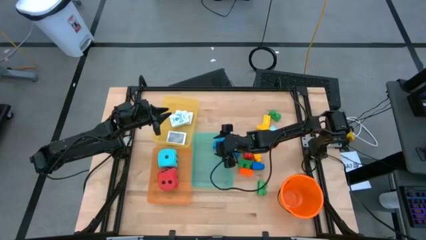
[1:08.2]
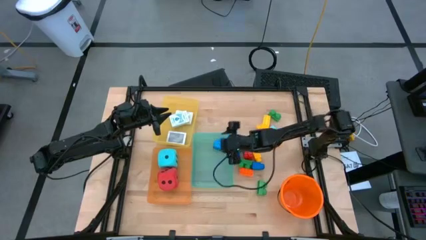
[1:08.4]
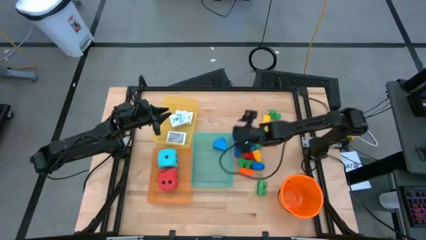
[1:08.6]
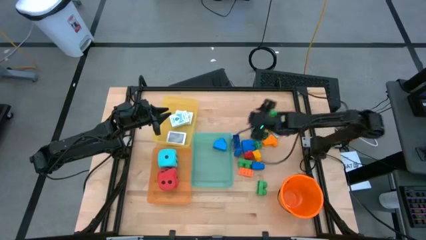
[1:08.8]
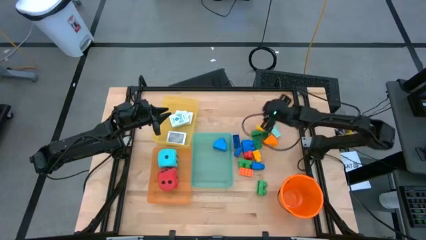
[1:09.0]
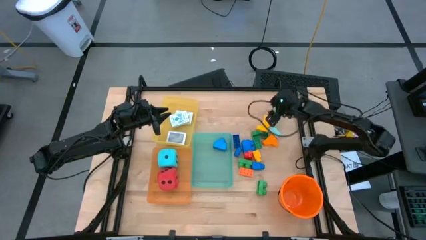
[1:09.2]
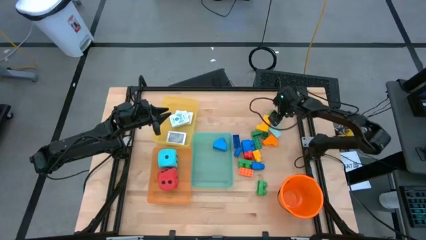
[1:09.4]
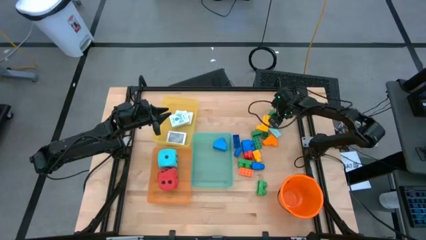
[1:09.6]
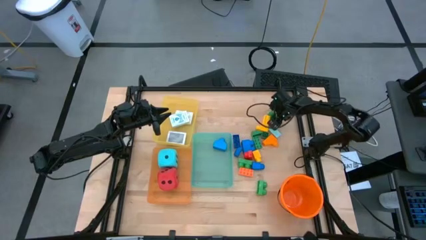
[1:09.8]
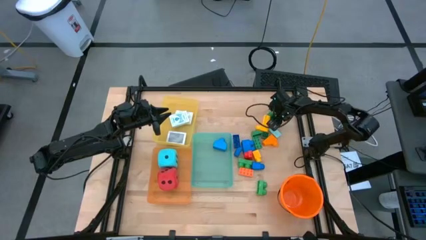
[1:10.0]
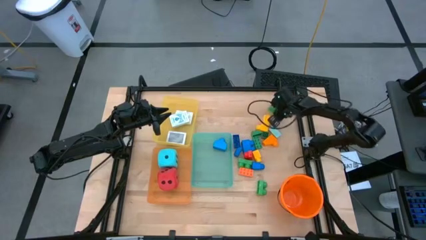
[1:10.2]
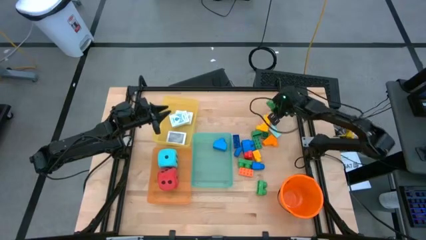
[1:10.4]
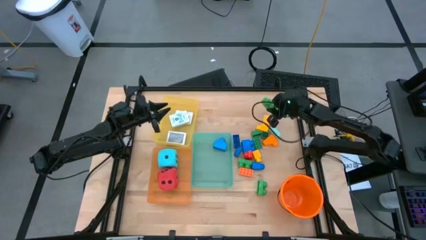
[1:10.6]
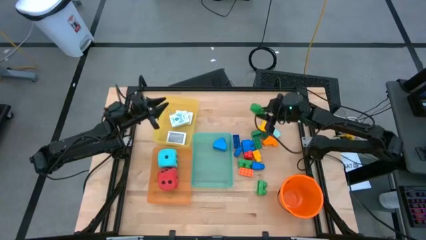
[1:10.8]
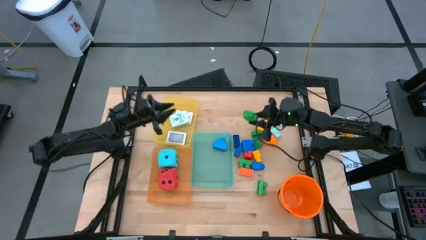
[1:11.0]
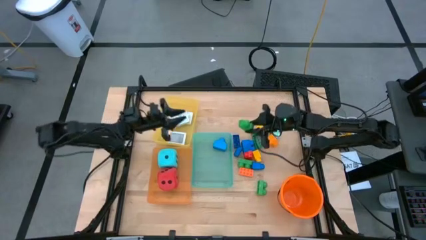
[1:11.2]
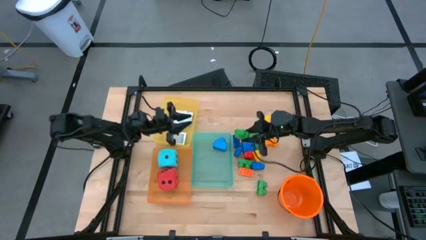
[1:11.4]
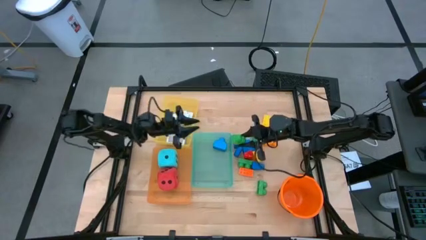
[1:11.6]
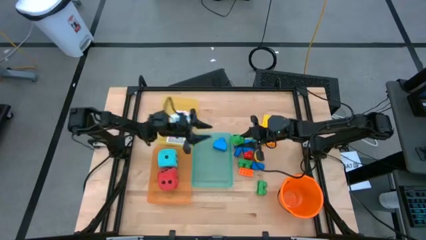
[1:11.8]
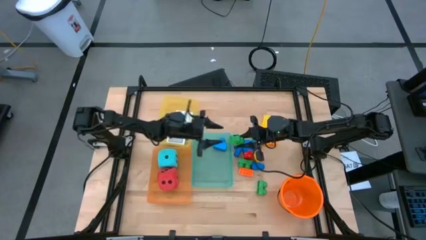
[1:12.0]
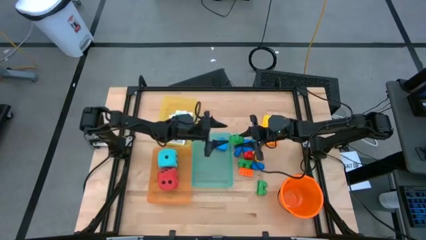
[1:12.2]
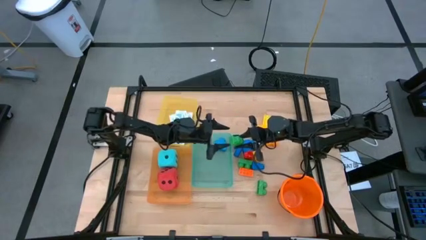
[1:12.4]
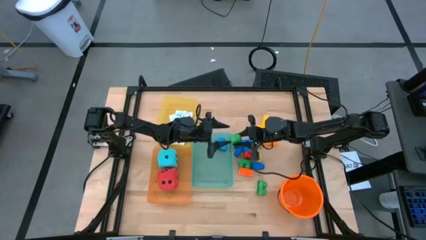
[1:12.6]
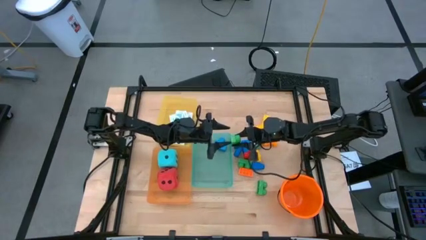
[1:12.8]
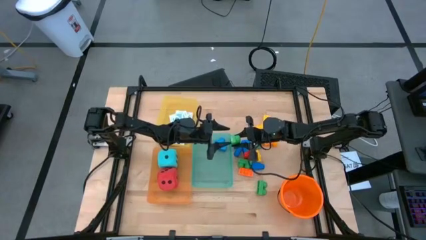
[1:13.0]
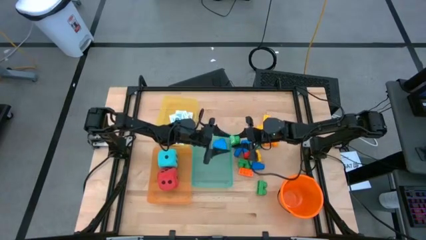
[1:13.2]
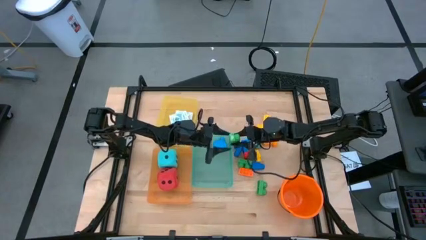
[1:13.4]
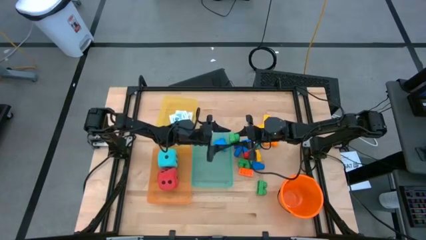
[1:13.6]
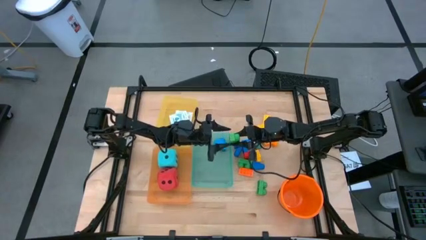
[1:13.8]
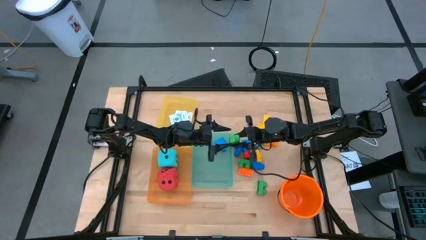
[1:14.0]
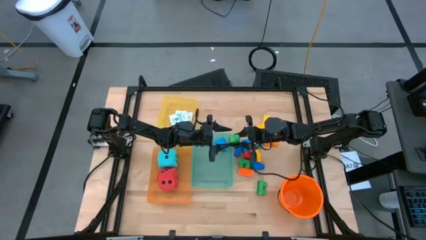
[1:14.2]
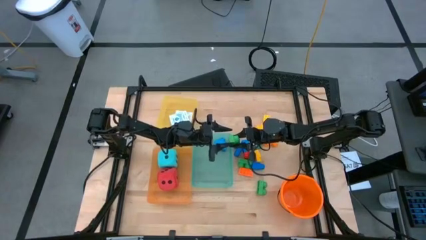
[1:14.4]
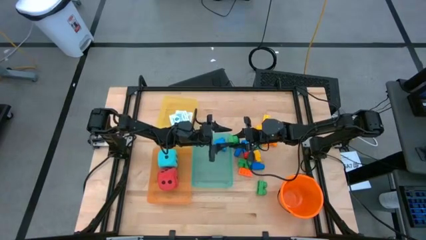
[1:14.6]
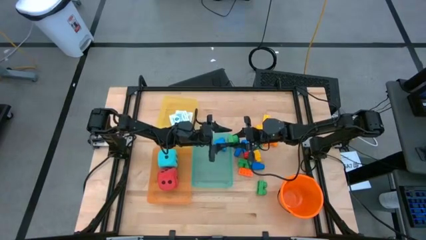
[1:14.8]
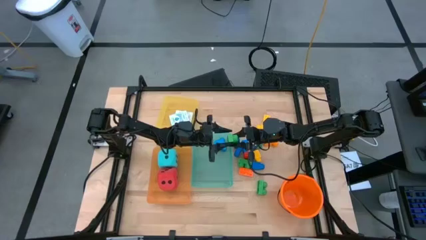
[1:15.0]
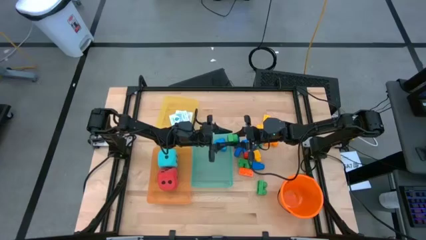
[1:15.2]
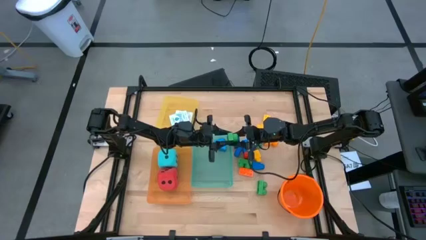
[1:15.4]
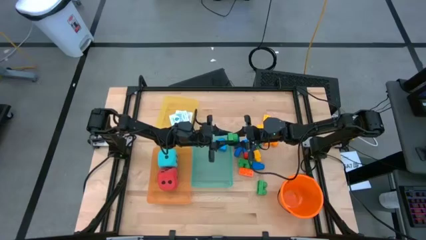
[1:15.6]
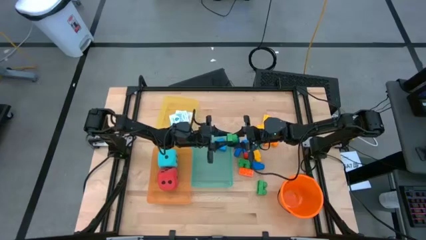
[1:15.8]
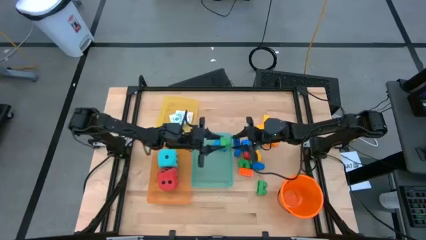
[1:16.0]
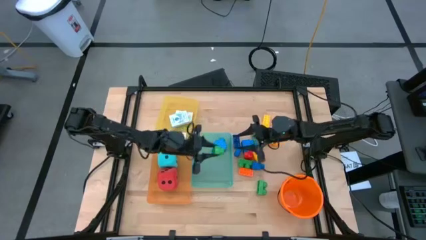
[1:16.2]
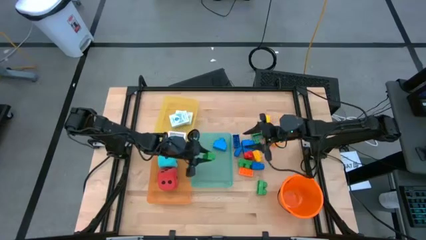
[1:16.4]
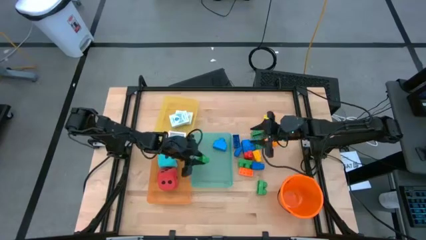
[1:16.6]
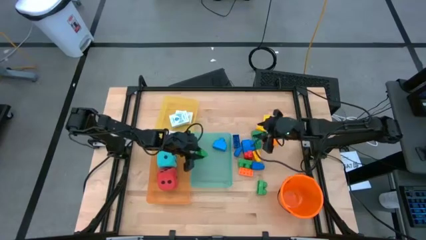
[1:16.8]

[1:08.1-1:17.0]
Task: Pick & Place Toys
Put the green game piece into the green bin

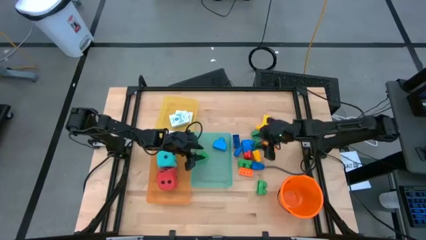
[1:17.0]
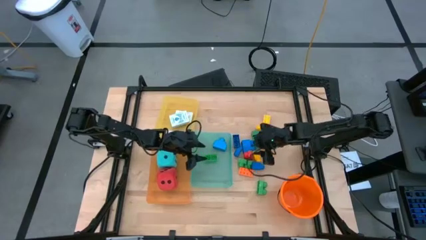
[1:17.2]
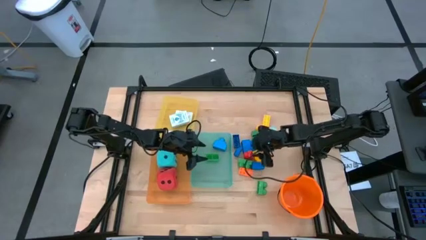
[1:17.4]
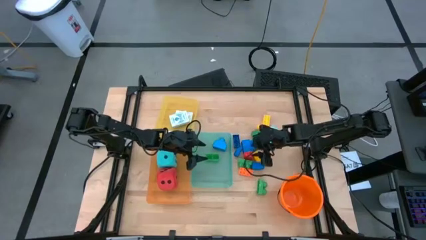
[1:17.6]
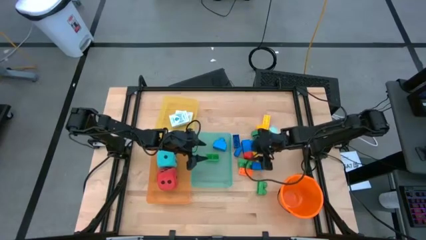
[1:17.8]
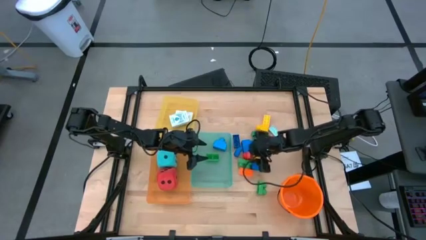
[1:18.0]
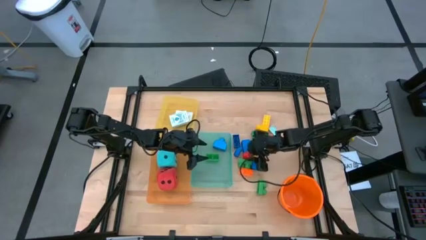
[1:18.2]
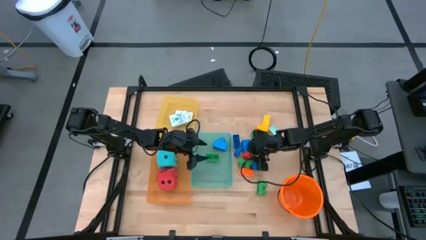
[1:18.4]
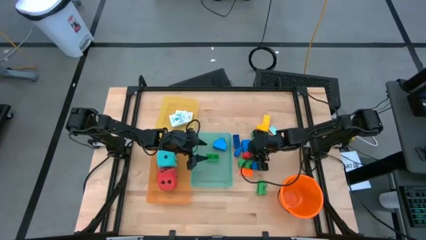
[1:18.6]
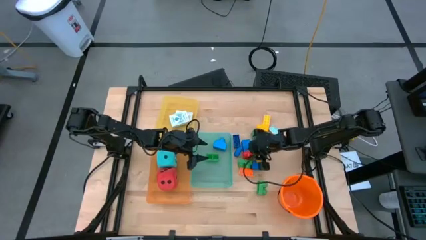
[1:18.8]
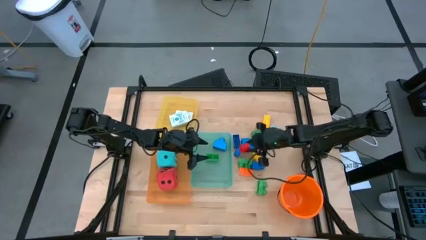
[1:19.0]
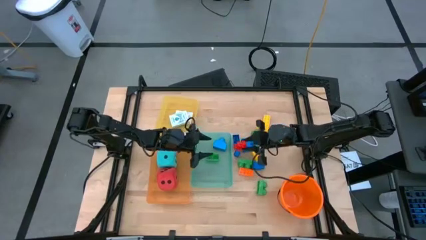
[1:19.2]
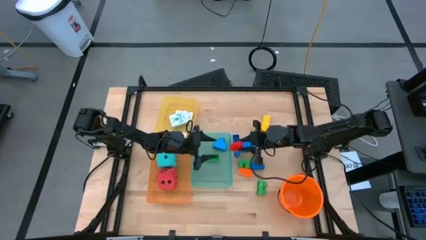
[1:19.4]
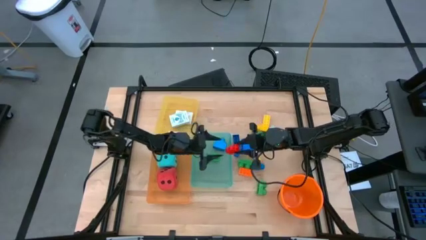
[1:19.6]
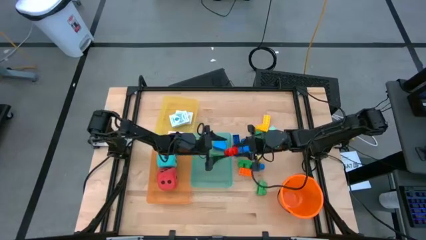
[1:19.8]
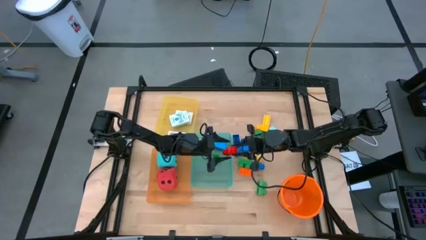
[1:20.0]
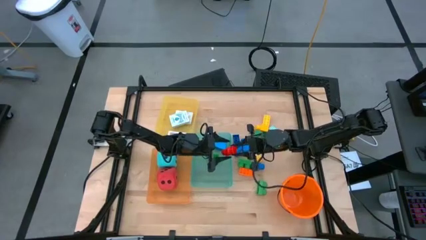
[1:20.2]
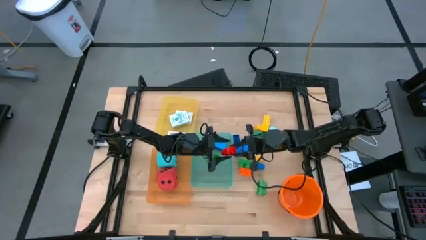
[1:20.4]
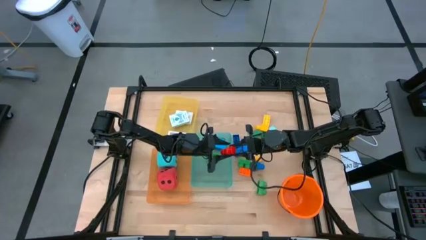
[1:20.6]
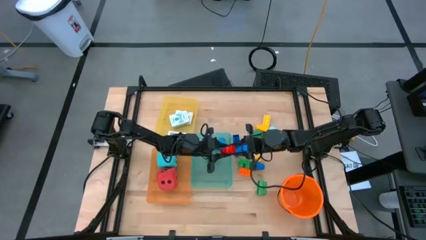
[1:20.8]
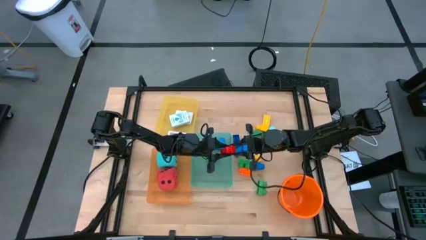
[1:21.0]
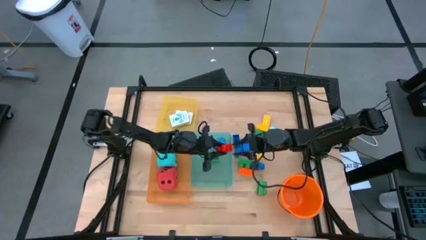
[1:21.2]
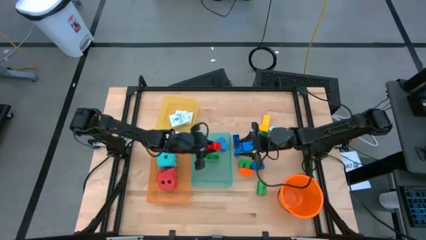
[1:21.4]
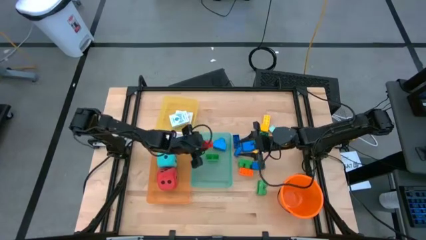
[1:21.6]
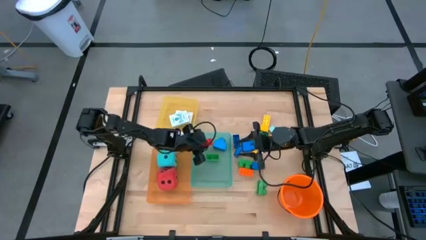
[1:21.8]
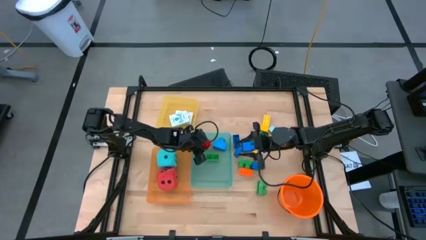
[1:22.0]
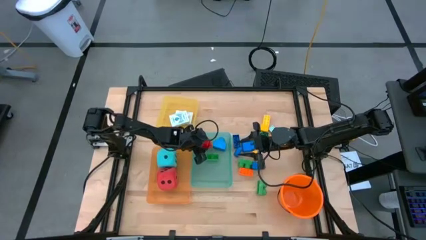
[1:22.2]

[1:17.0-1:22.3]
Put the red game piece into the green bin

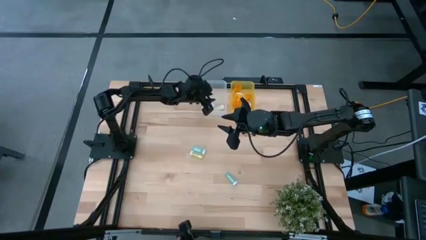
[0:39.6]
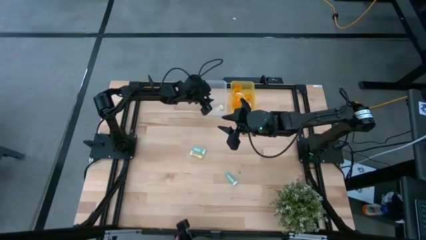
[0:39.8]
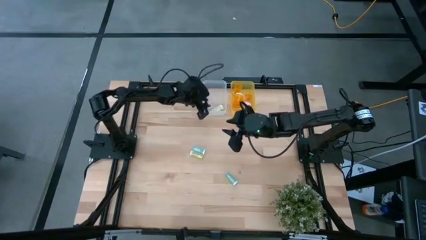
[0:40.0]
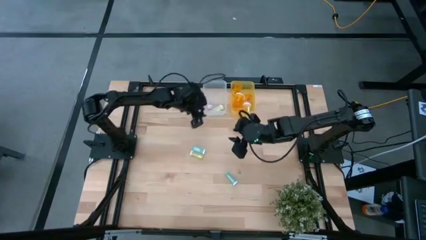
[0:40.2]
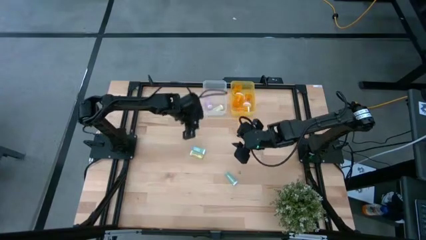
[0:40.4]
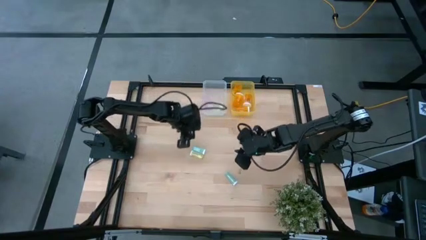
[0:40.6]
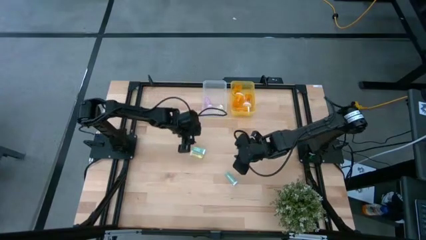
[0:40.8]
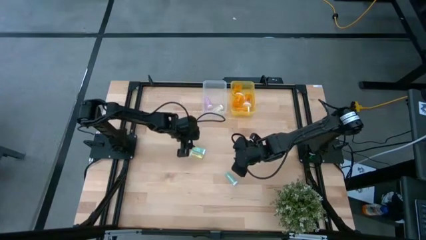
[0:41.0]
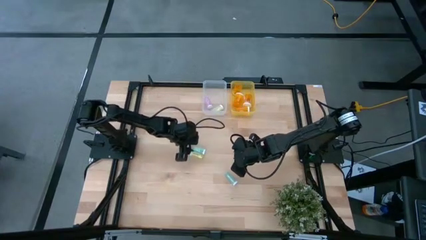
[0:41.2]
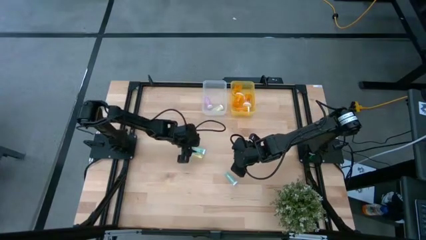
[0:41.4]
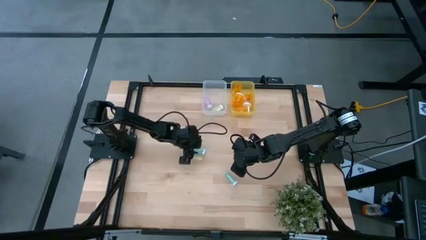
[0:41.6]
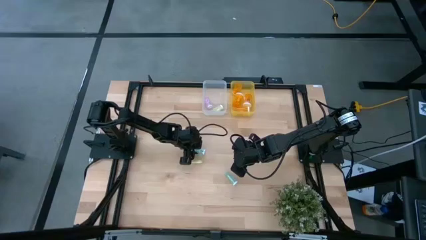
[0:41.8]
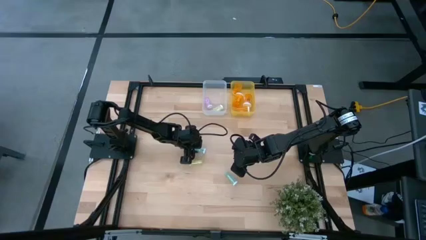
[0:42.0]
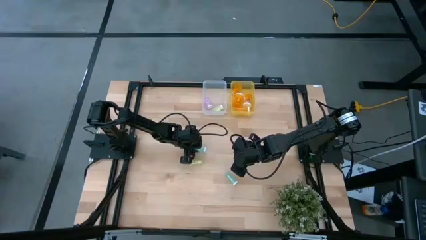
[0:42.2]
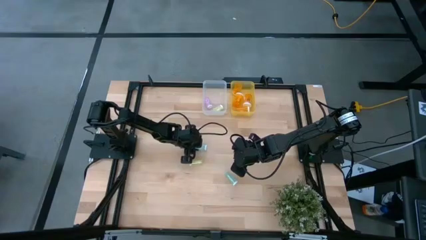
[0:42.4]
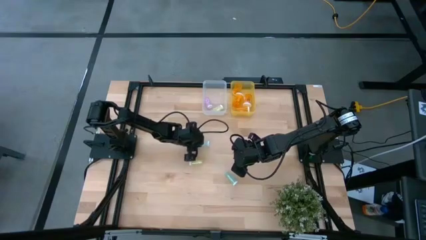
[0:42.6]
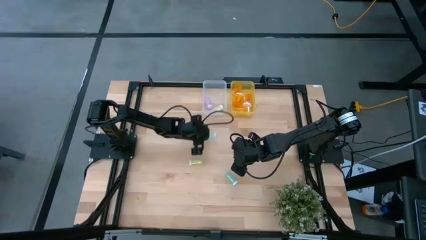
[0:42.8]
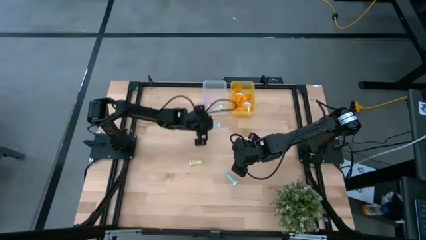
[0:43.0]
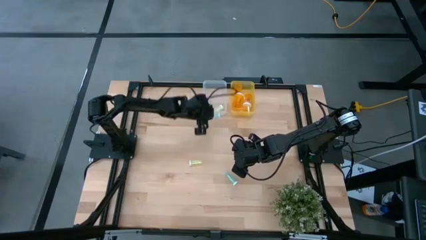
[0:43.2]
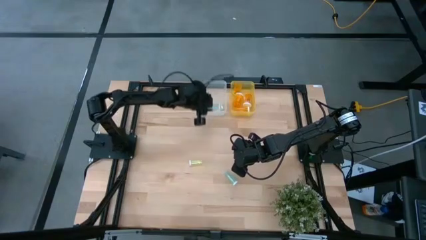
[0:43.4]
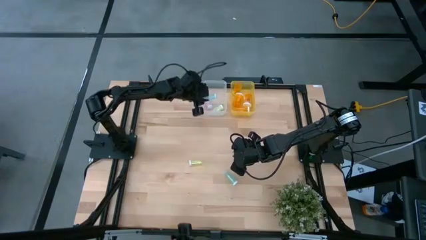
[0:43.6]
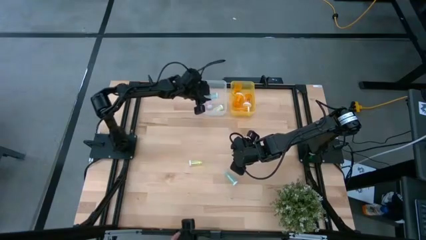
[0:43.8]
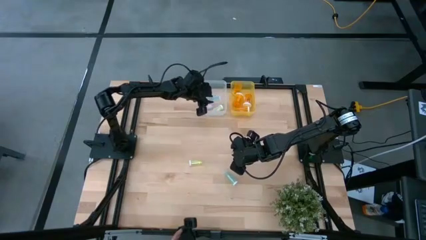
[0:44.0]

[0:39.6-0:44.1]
Task: Pick and place medicine bottles into bin by pill shape (circle, oval)
Put the small blue pill bottle into the transparent bin
